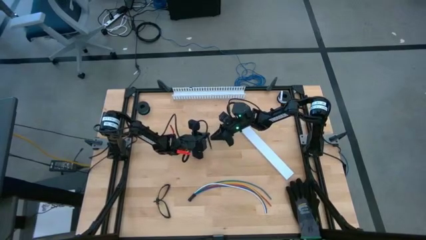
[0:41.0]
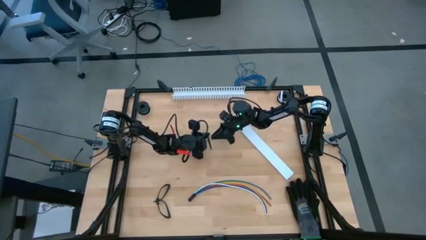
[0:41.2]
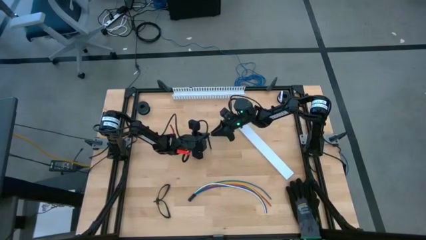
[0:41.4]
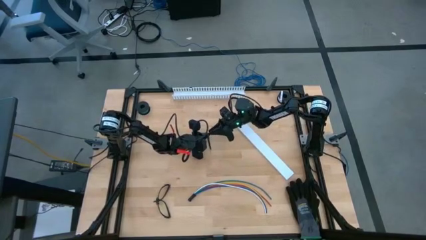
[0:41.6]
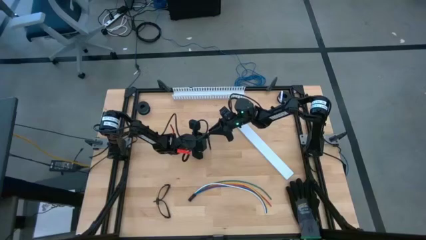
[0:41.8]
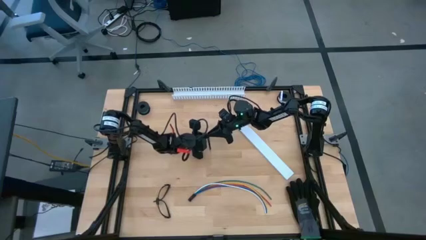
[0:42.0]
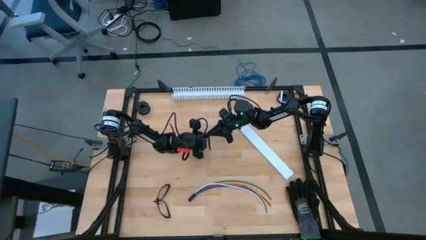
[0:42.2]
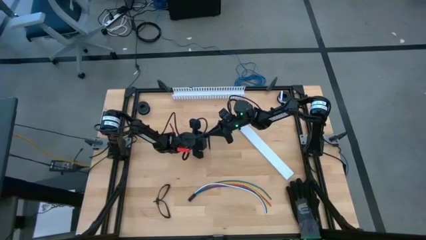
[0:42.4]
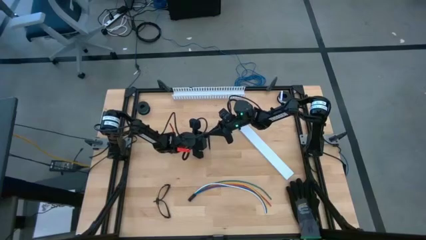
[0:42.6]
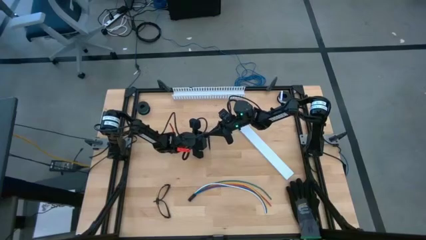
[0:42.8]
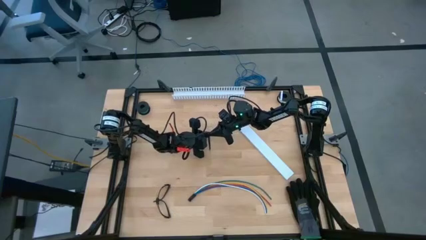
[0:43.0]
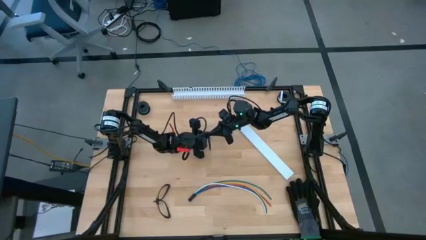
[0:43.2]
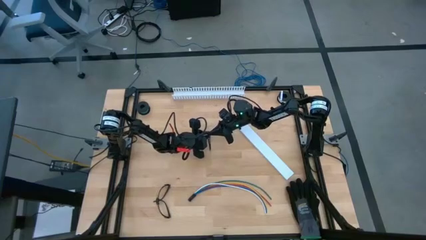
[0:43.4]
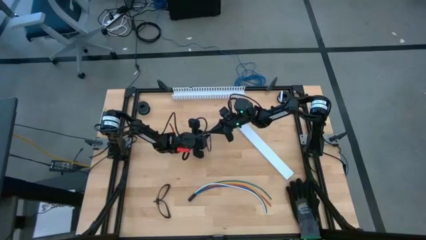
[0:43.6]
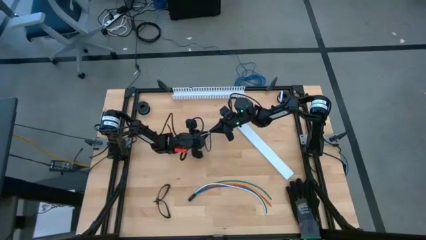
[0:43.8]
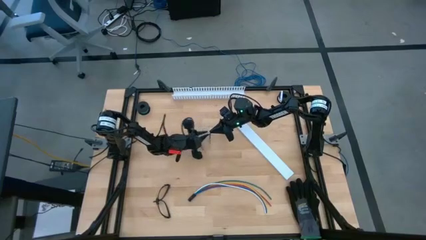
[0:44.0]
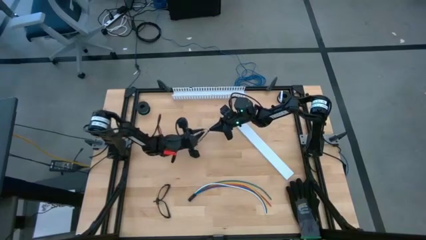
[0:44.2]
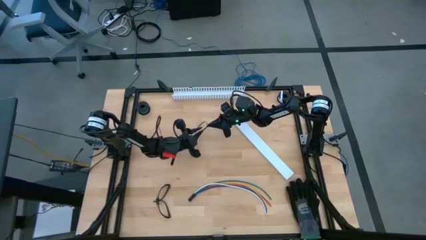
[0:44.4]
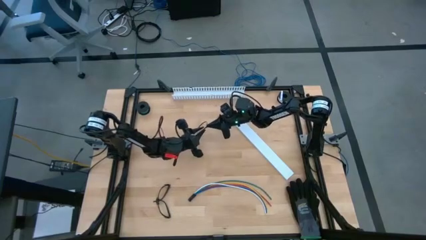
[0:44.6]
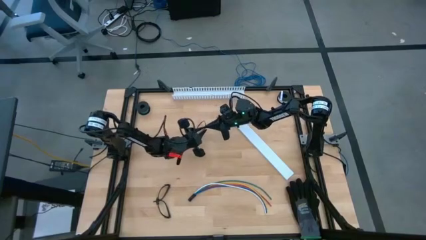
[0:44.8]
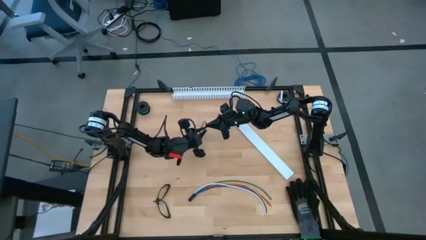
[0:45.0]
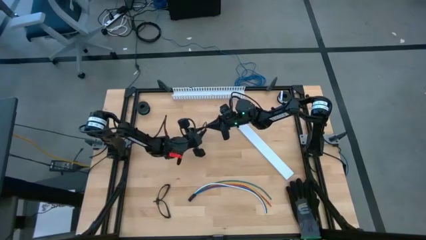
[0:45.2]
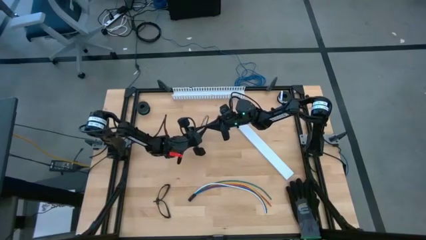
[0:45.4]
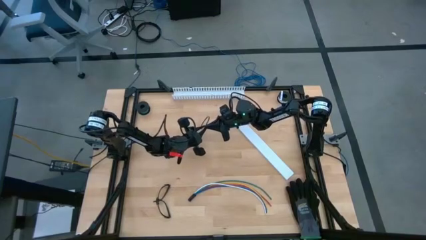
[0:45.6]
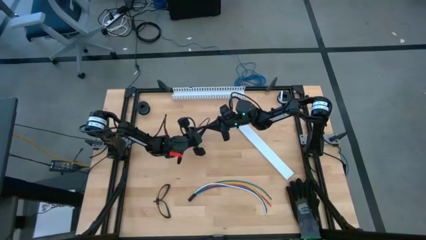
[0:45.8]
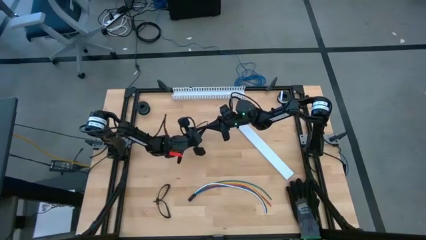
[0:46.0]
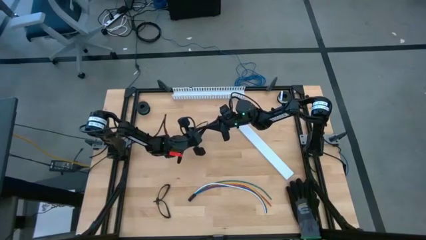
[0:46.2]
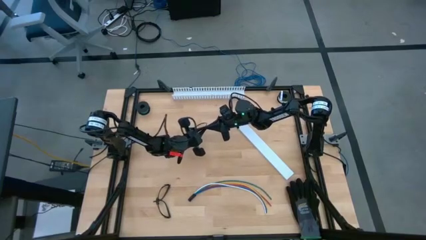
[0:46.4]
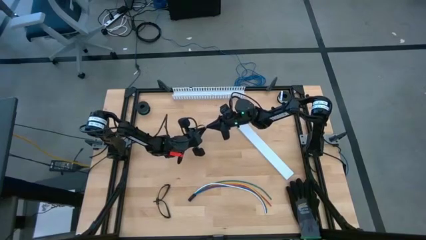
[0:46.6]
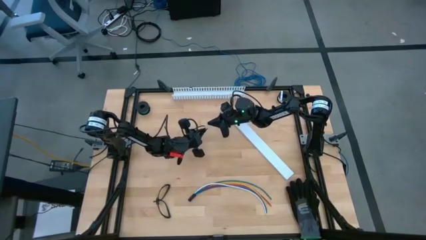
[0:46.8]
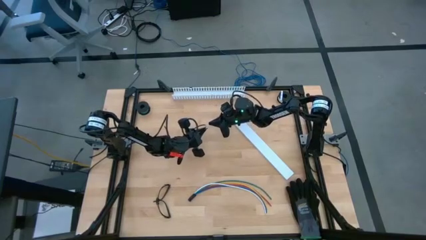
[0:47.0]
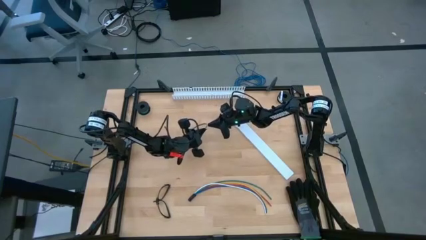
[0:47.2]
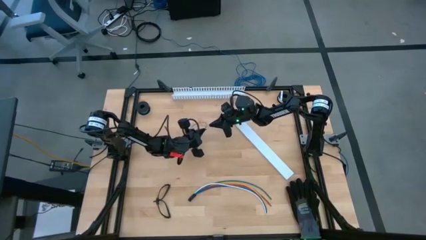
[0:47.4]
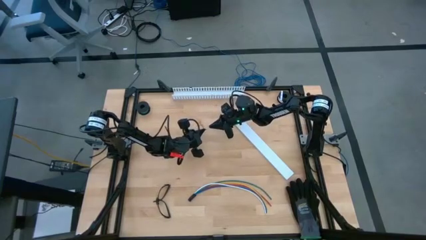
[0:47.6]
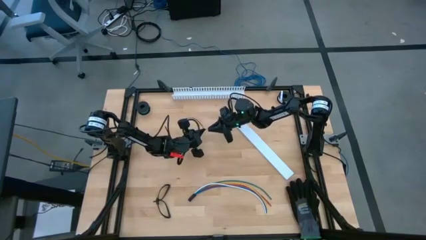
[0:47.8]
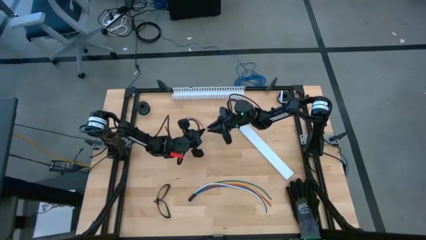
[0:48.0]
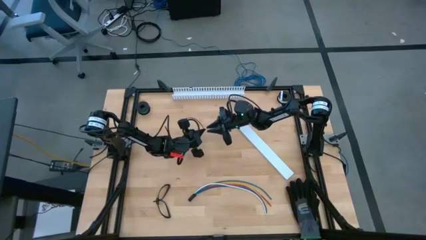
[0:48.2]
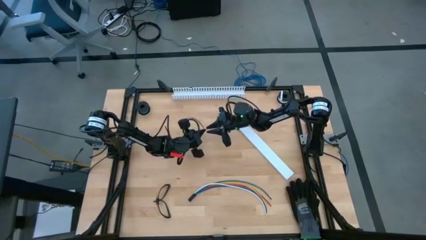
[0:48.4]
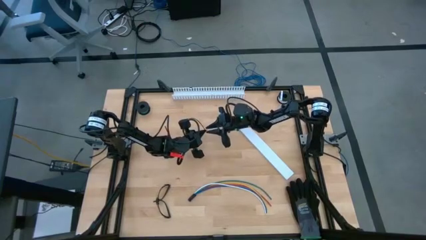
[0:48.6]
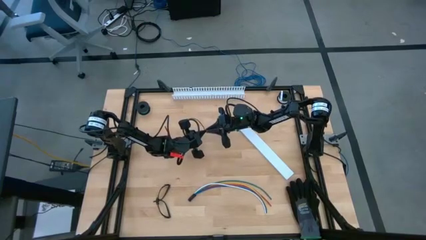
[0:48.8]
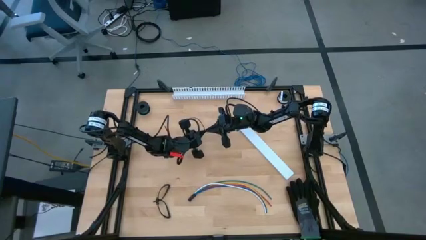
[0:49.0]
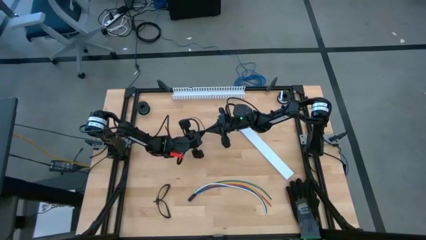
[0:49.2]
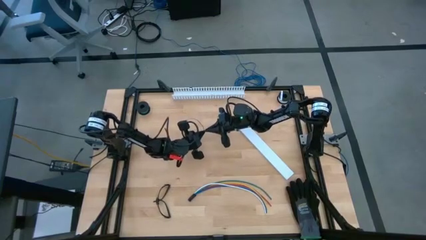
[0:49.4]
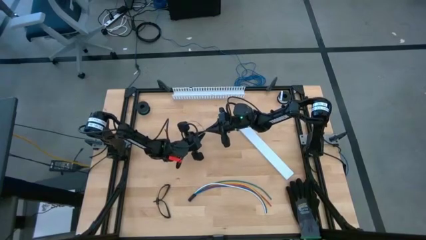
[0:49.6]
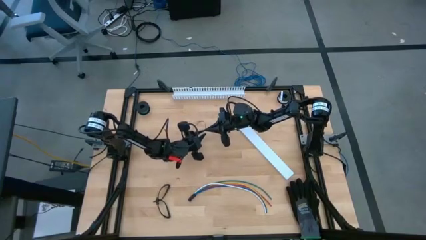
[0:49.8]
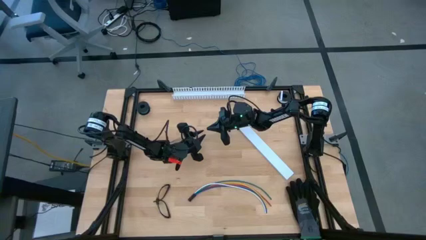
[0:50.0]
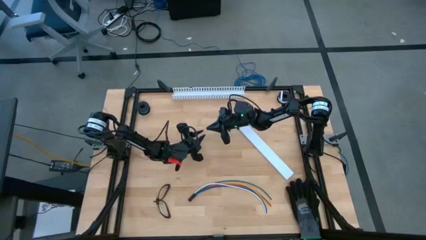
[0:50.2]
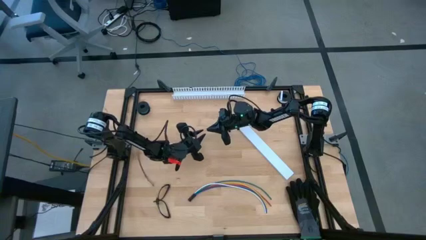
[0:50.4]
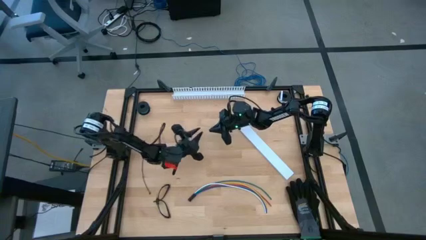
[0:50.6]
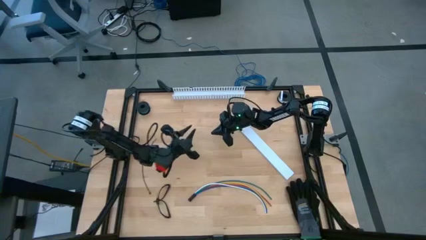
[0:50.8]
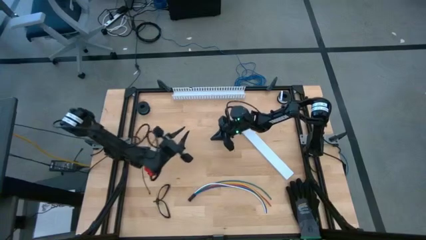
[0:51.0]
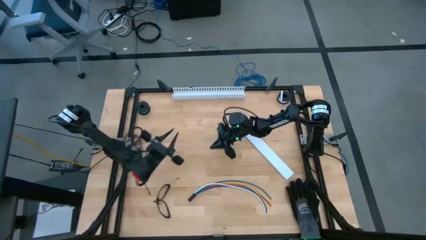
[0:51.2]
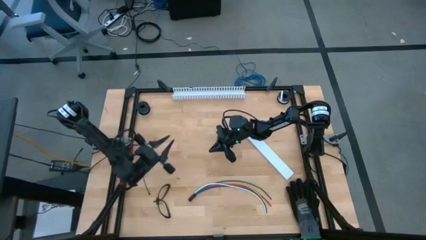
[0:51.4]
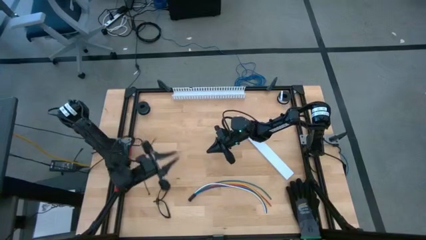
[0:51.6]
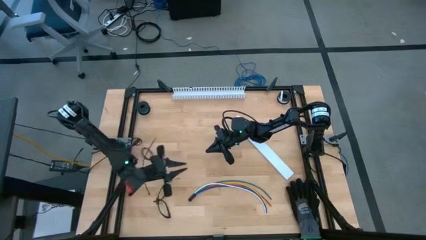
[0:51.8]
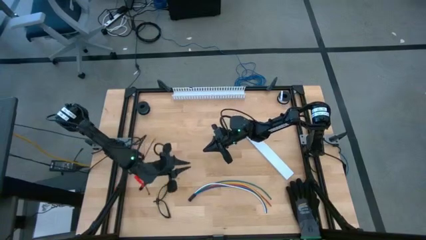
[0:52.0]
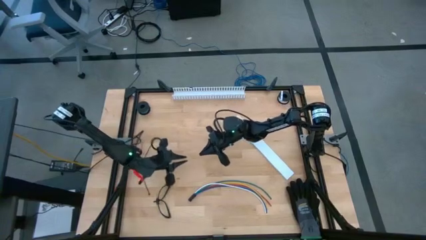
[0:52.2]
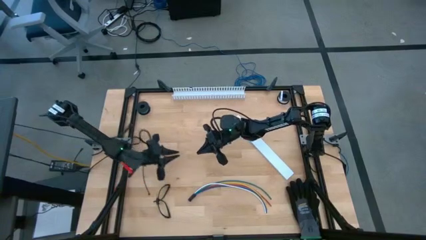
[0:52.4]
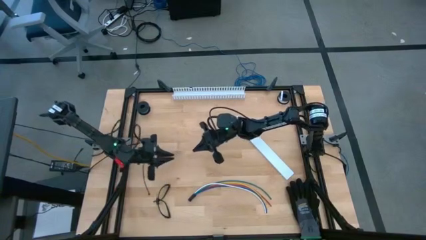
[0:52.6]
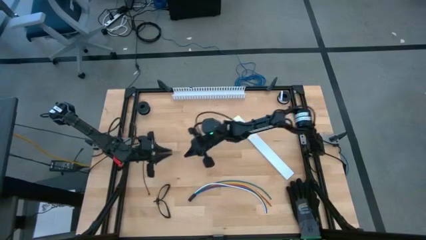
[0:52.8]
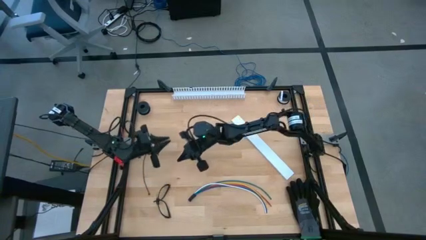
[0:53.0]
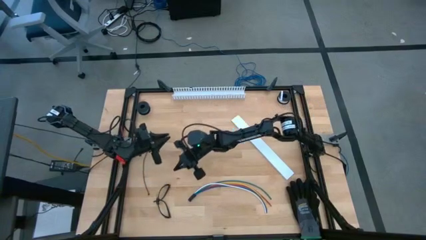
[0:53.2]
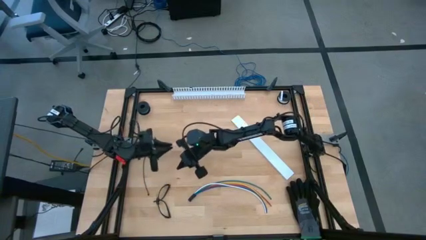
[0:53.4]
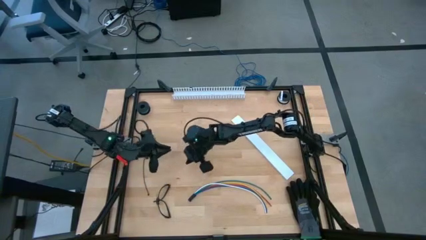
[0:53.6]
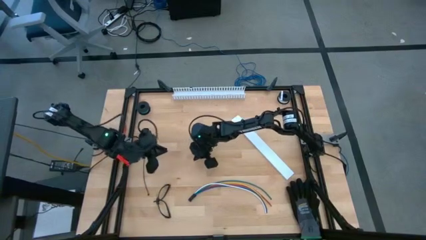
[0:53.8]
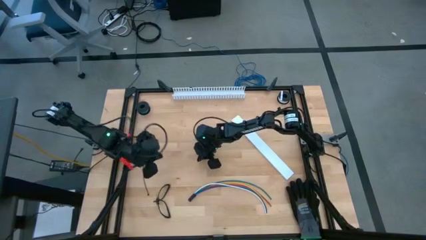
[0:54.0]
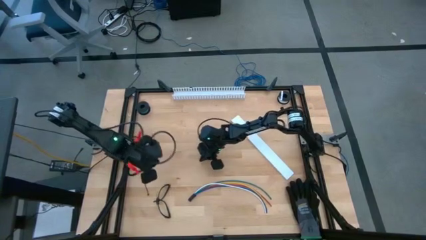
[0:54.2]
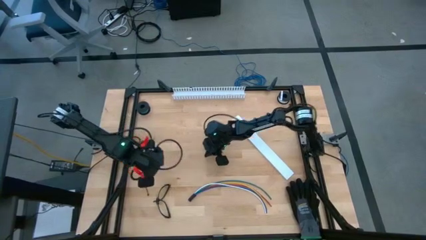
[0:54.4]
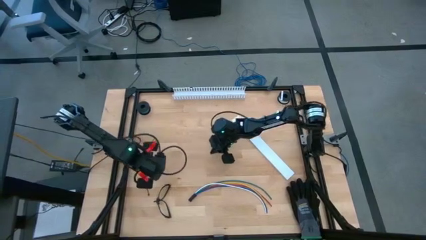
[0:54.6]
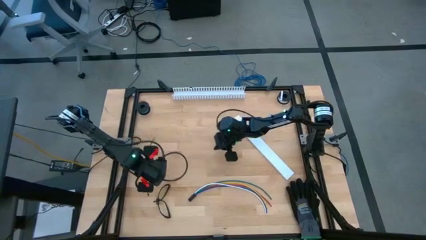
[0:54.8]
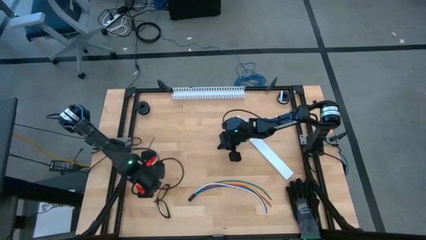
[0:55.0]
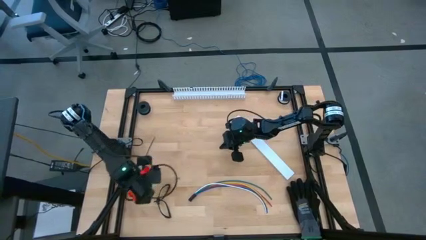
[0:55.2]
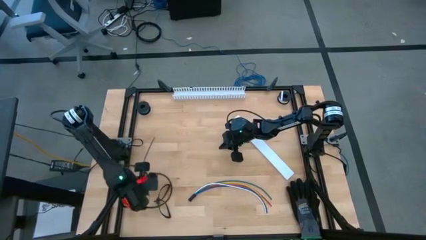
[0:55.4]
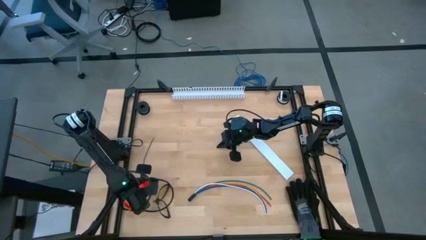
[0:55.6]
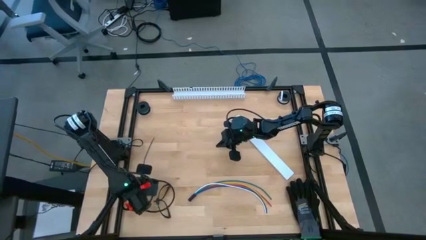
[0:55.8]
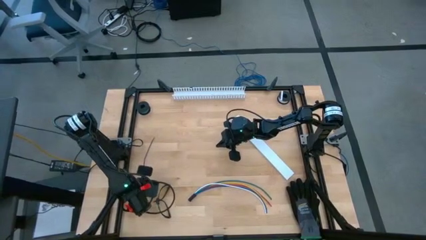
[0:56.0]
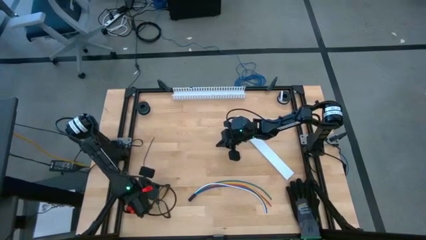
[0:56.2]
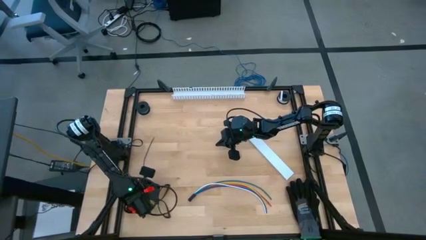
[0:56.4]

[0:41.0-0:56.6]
Task: Ziptie cables
Wrap the zip tie around the cable wires
